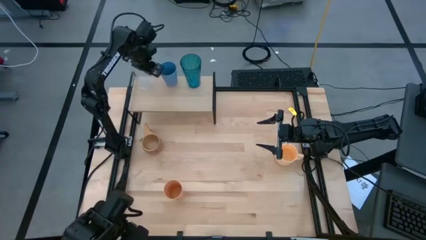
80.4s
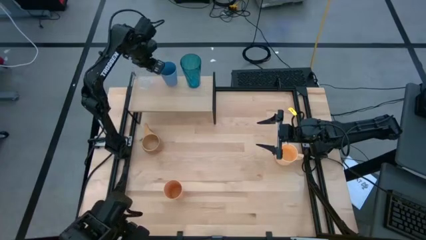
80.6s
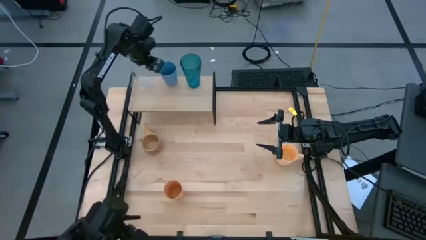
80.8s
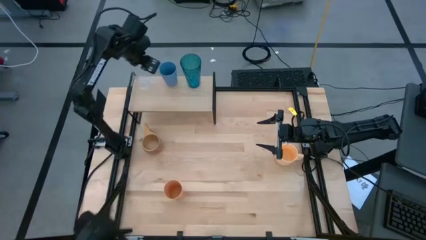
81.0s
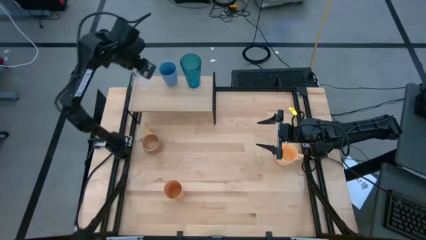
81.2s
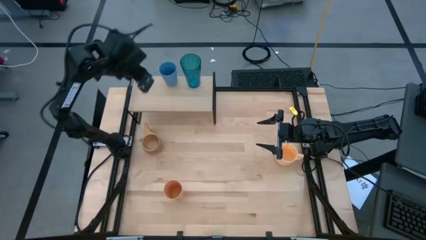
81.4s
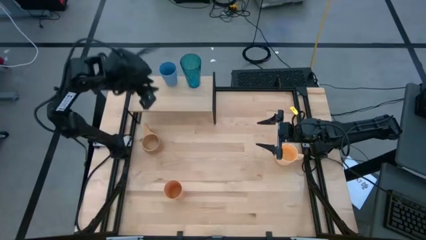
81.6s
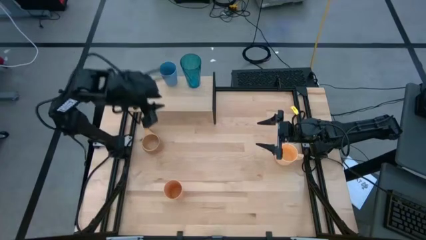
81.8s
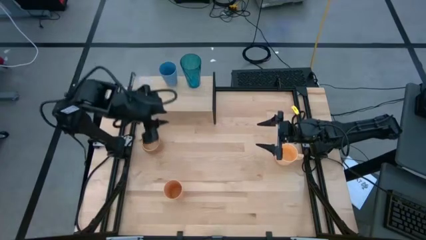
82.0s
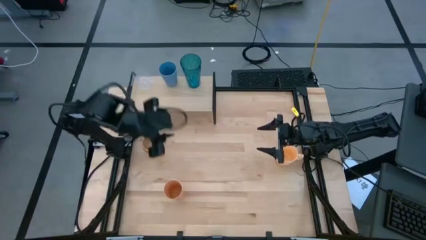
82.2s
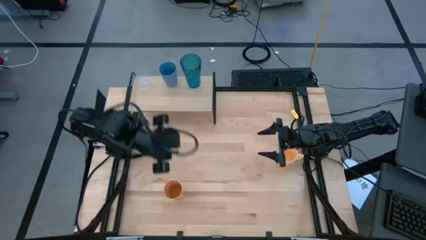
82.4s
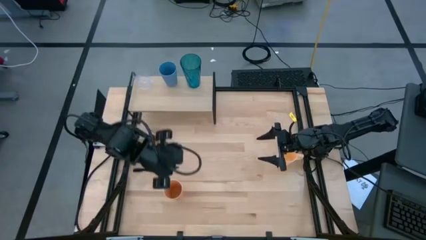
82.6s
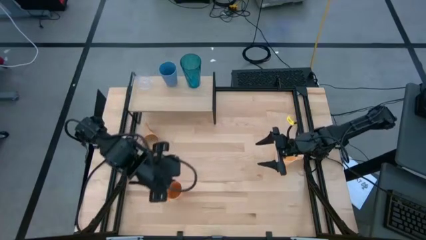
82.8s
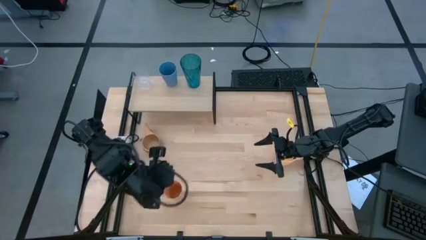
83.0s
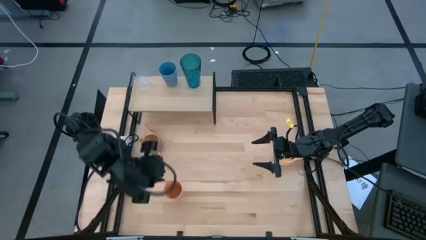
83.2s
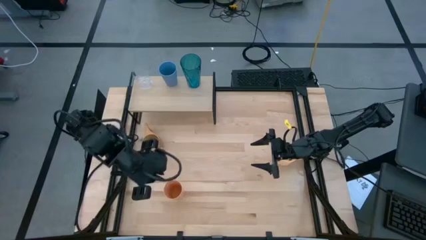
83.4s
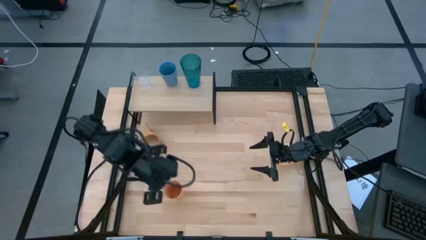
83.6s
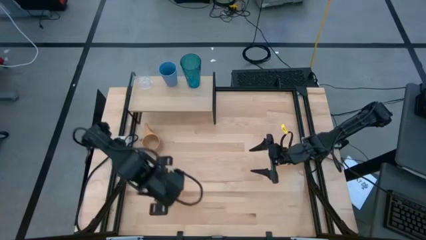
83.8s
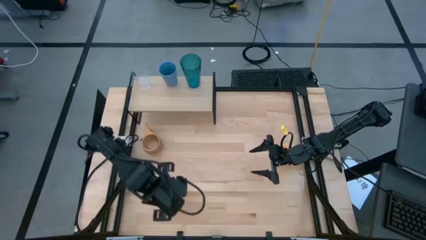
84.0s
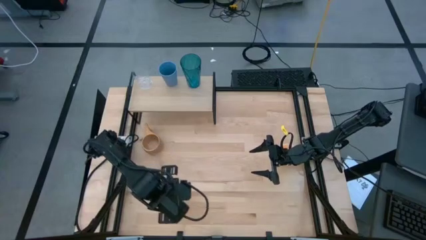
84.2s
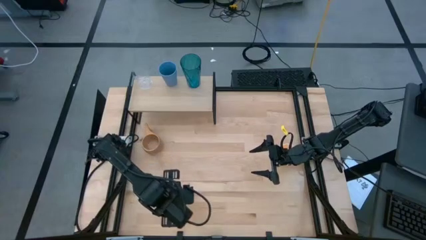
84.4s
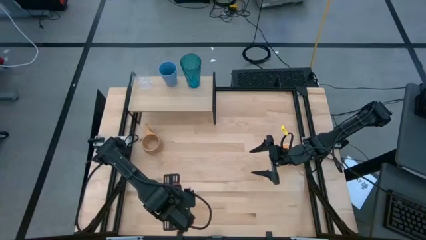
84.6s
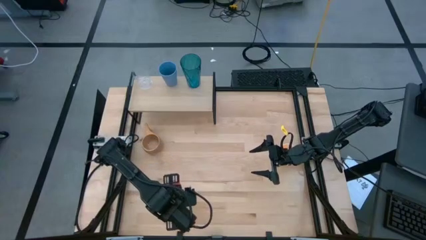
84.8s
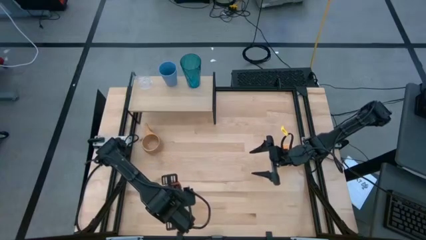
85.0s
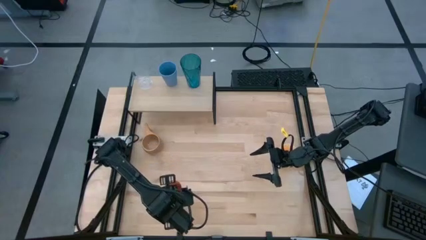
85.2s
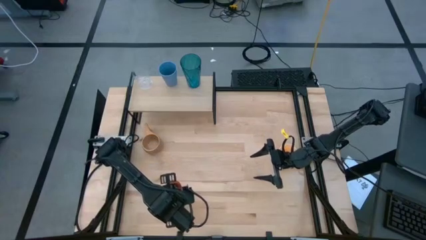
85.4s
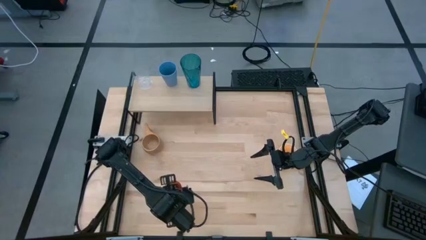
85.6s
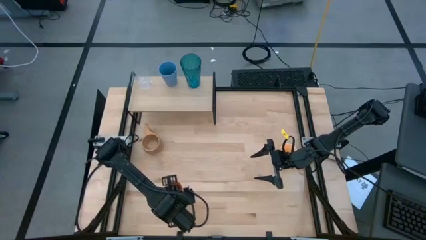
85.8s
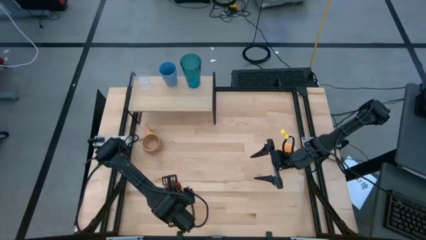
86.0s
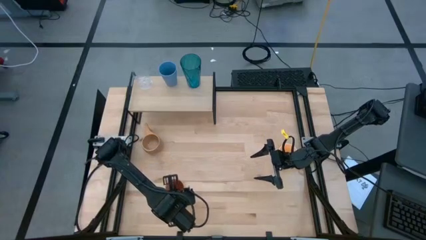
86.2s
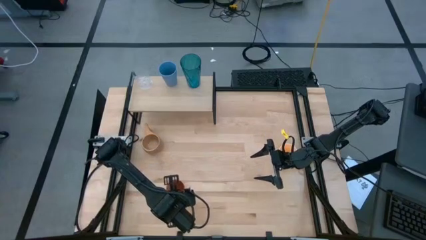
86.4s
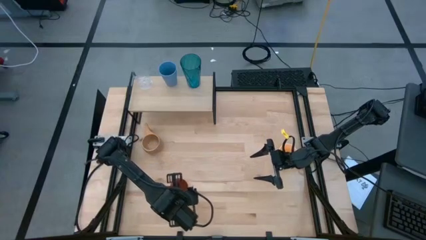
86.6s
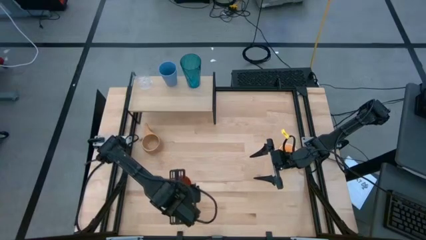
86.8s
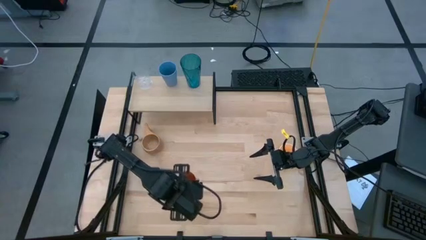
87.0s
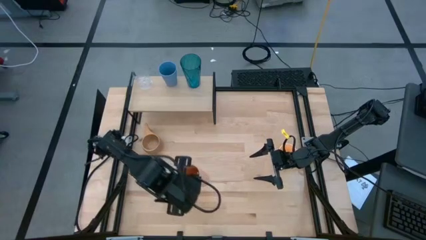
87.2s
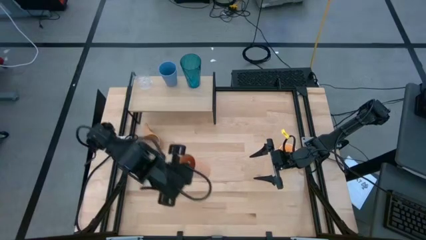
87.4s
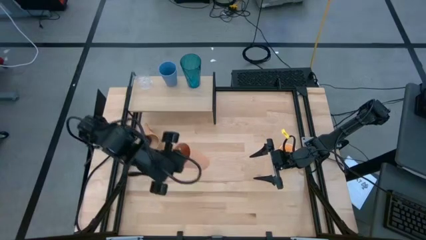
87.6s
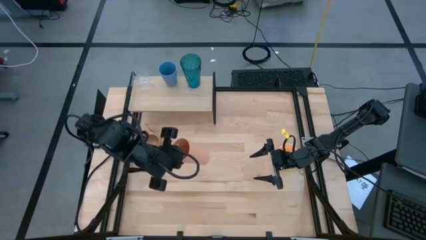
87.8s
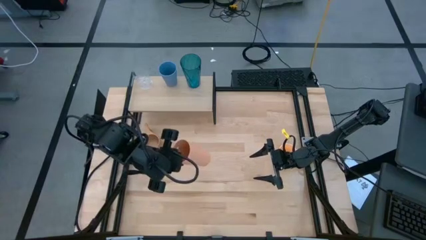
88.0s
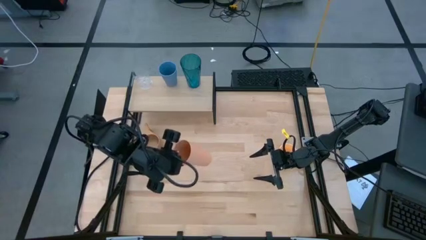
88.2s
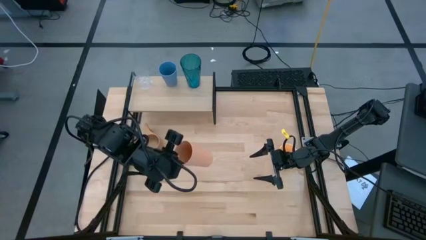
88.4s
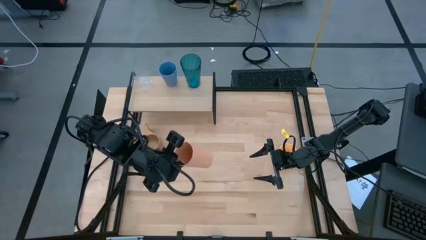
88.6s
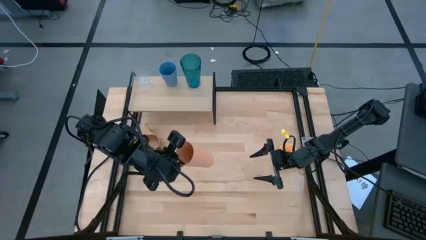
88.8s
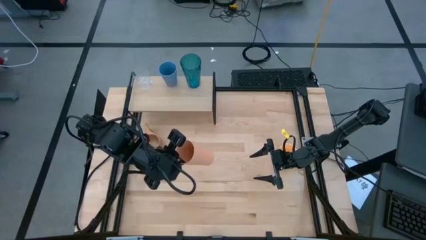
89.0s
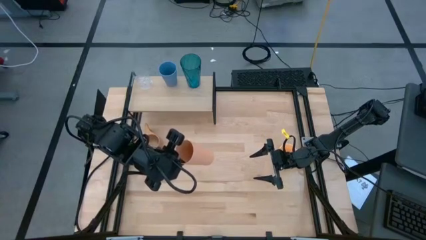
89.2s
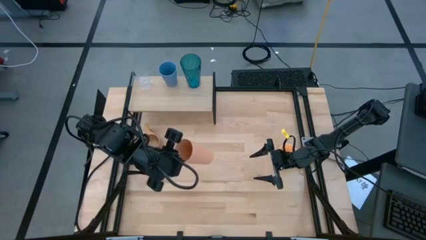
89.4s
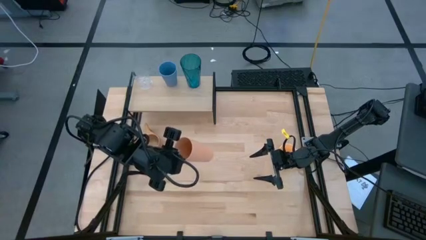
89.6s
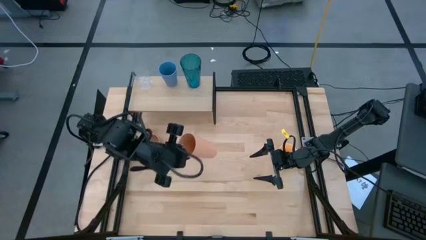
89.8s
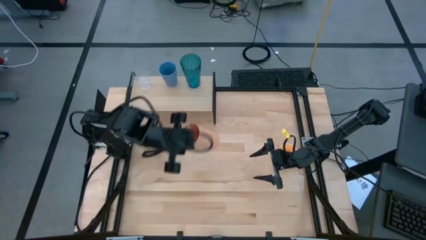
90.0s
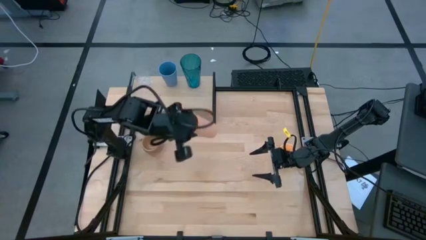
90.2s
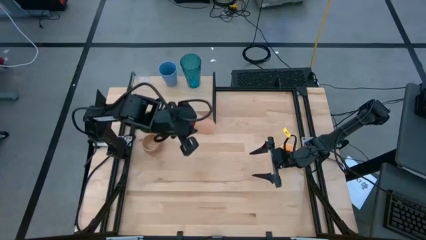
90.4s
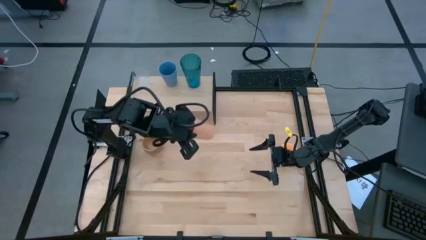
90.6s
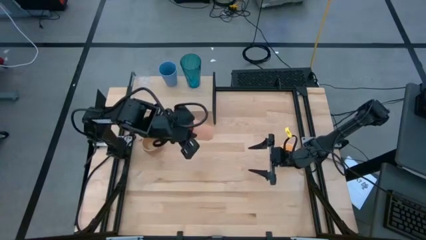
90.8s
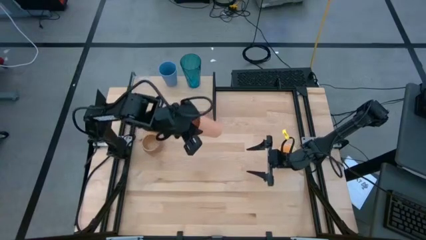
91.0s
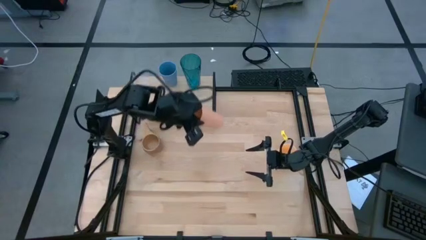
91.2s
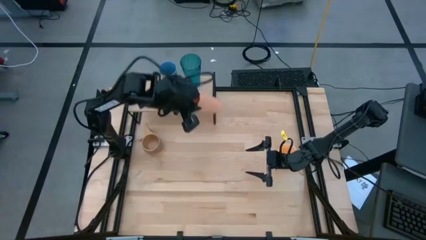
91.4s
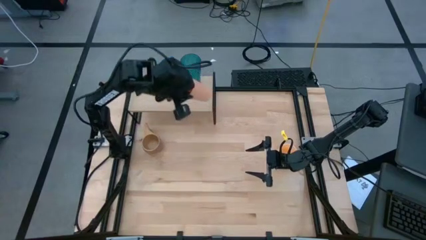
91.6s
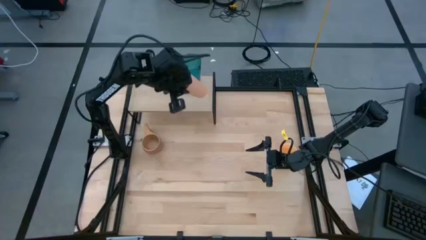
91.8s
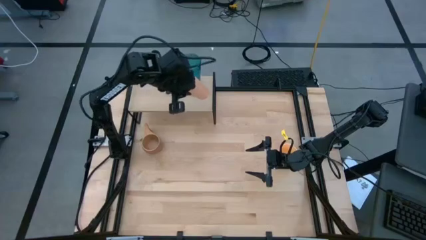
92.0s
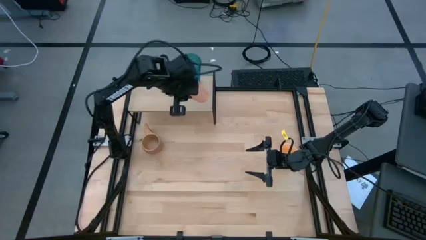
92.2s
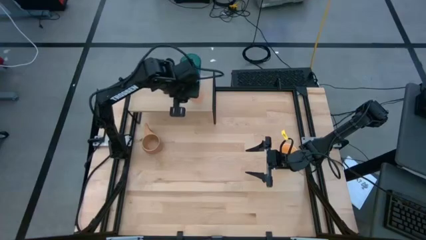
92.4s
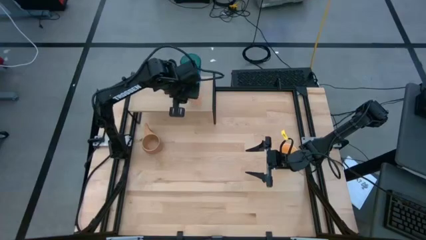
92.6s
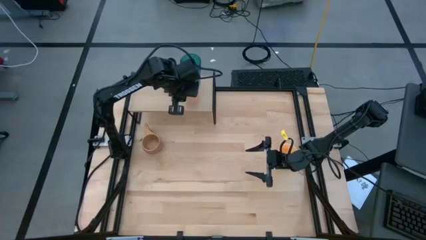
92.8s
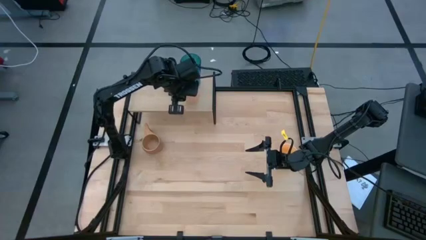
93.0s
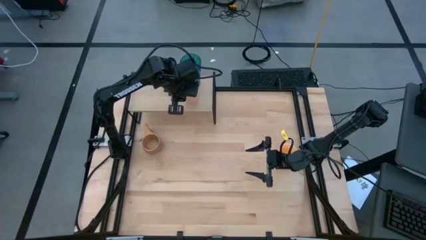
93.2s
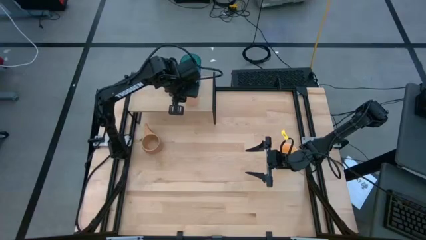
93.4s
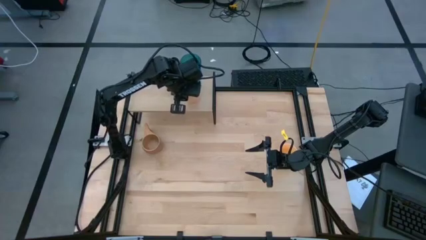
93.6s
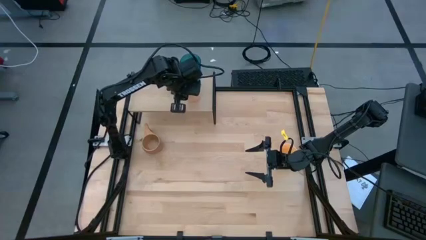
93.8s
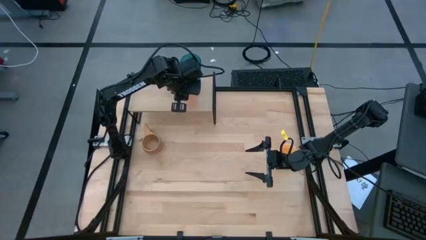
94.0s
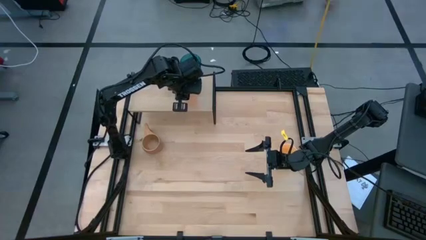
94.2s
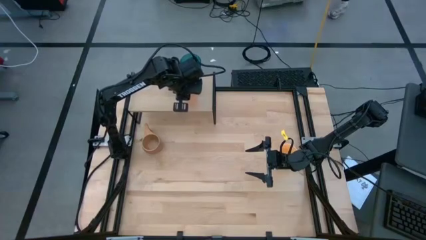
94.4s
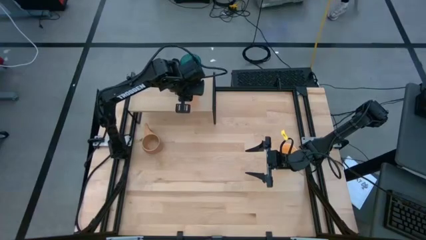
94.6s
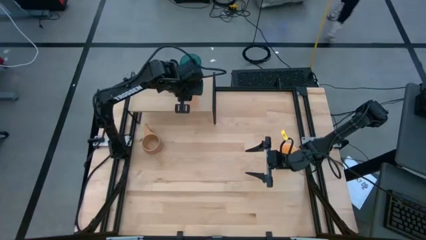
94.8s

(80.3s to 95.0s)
Task: Stack small to large cups/mugs on shelf
Put the orange cup on the shelf
